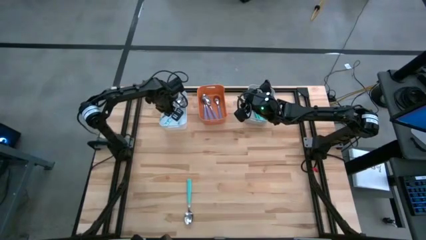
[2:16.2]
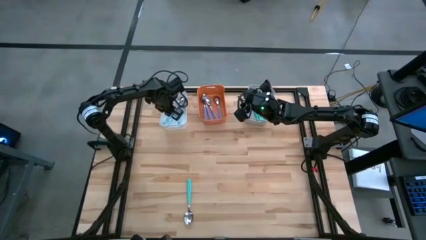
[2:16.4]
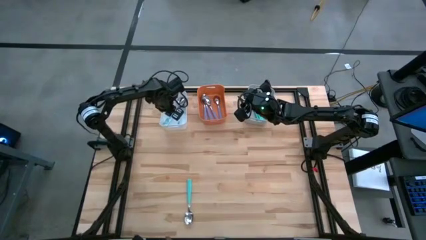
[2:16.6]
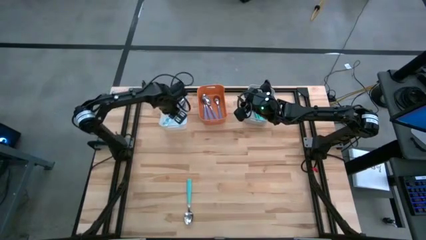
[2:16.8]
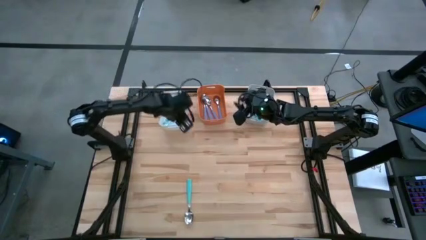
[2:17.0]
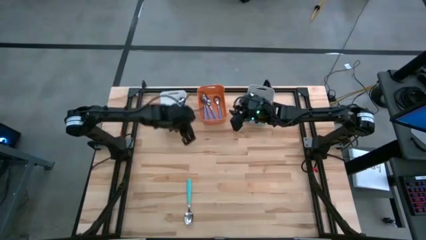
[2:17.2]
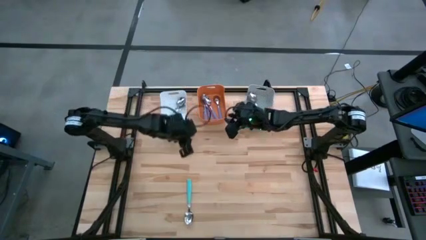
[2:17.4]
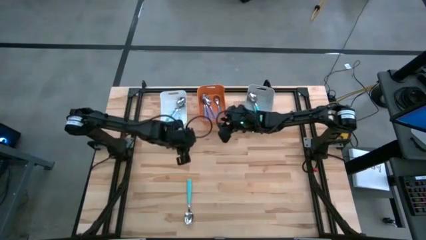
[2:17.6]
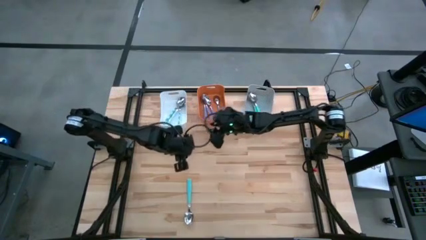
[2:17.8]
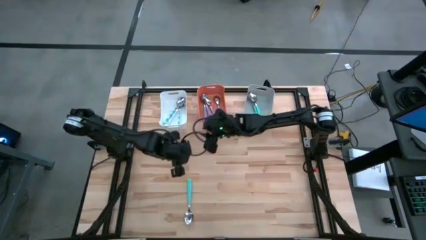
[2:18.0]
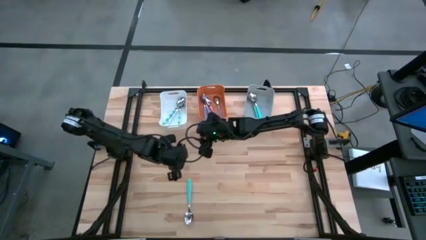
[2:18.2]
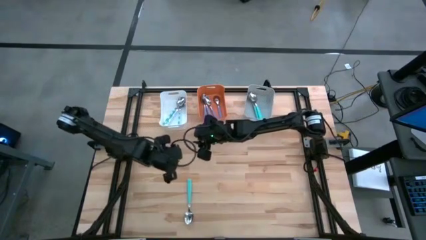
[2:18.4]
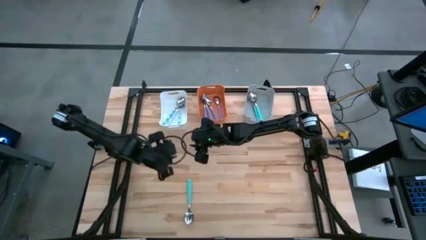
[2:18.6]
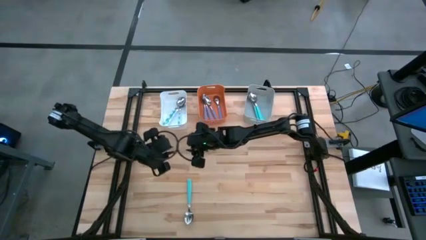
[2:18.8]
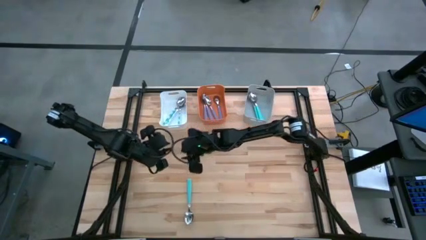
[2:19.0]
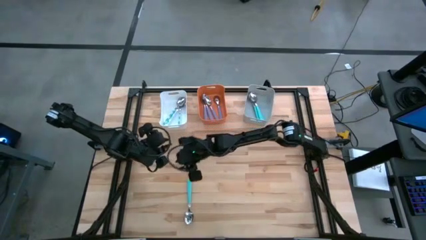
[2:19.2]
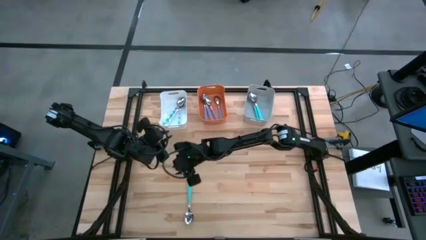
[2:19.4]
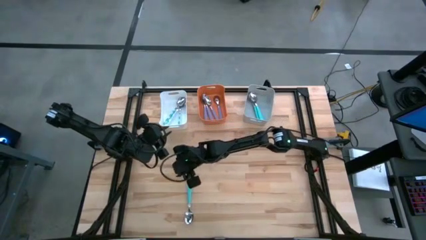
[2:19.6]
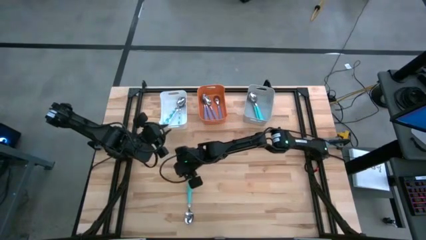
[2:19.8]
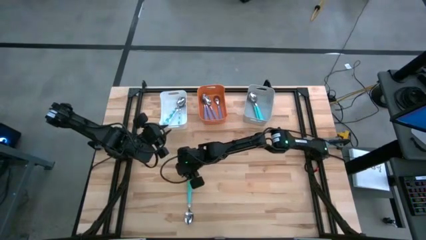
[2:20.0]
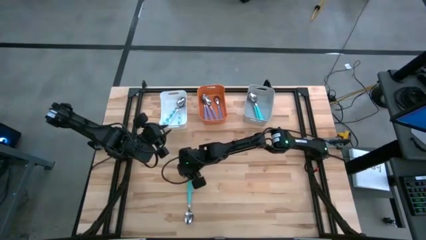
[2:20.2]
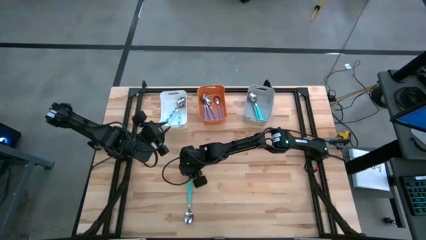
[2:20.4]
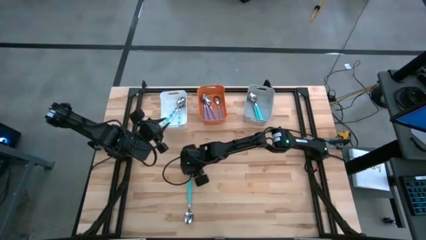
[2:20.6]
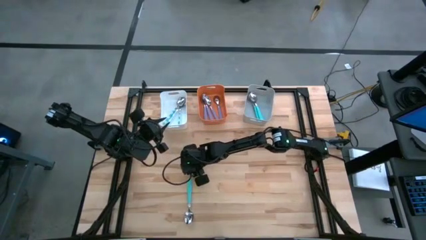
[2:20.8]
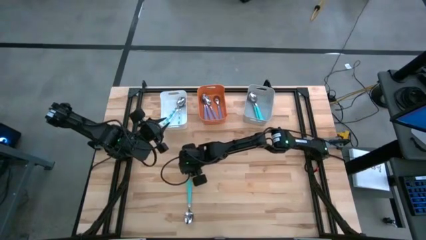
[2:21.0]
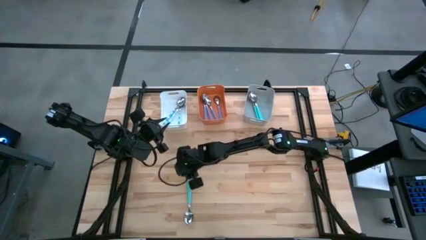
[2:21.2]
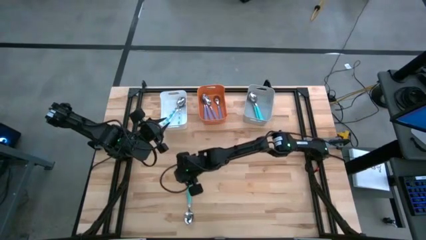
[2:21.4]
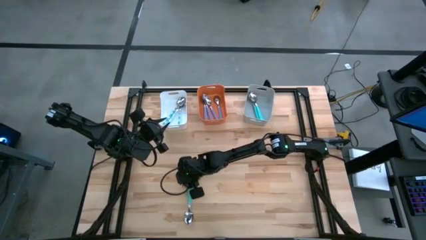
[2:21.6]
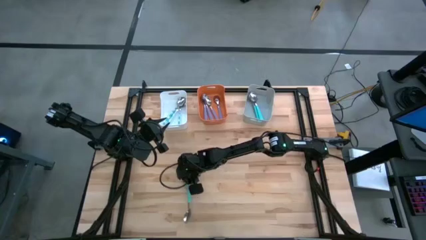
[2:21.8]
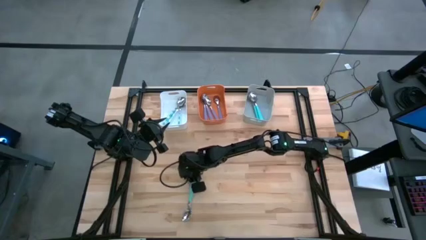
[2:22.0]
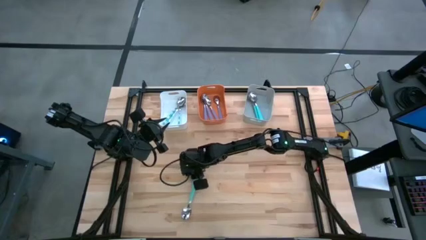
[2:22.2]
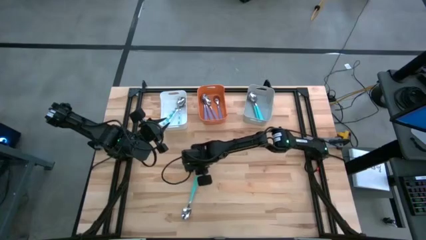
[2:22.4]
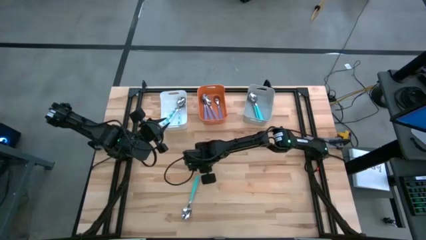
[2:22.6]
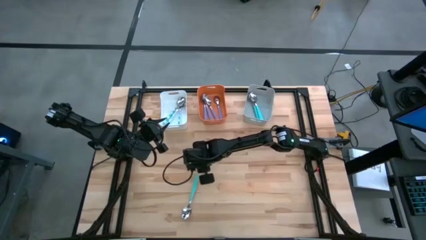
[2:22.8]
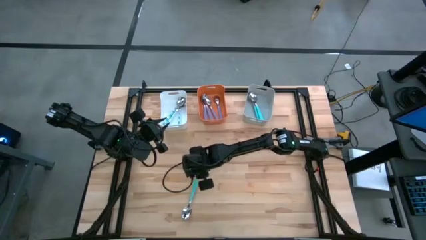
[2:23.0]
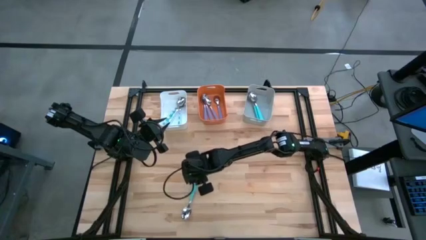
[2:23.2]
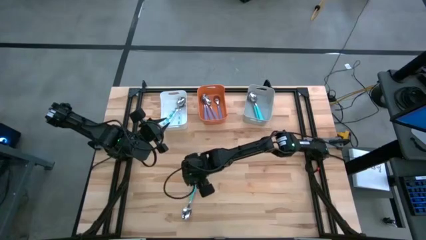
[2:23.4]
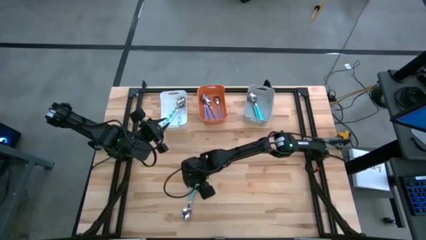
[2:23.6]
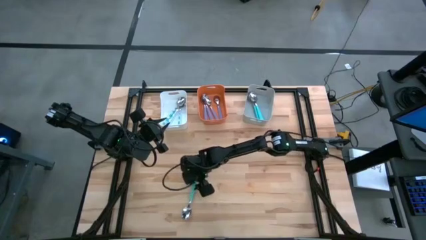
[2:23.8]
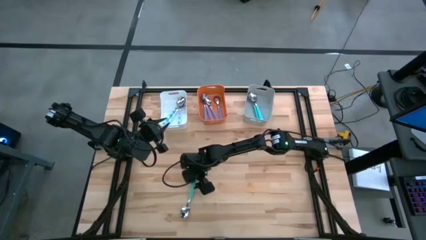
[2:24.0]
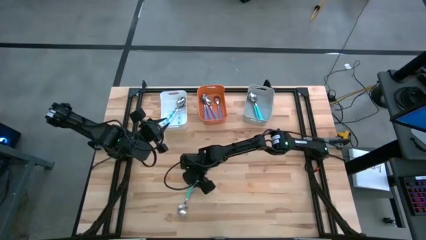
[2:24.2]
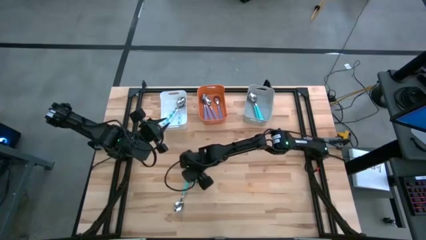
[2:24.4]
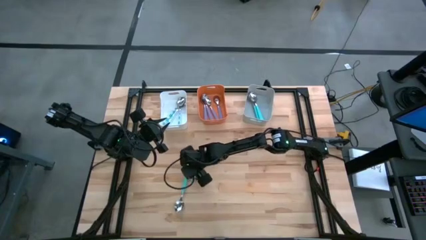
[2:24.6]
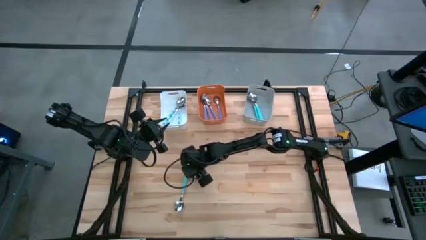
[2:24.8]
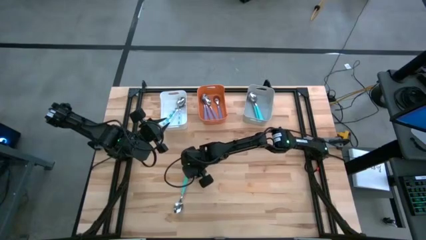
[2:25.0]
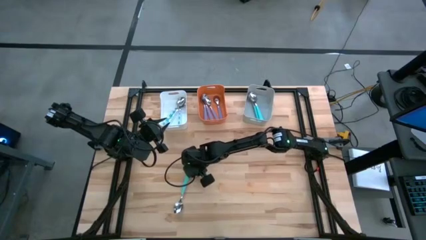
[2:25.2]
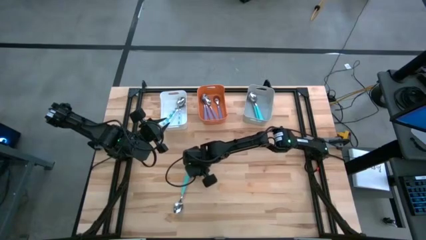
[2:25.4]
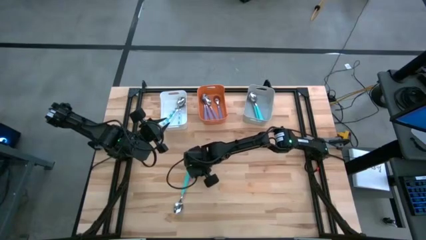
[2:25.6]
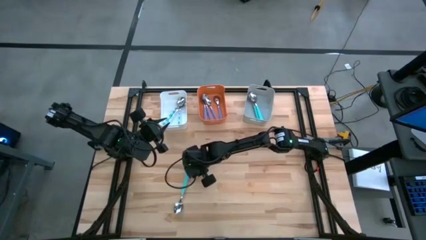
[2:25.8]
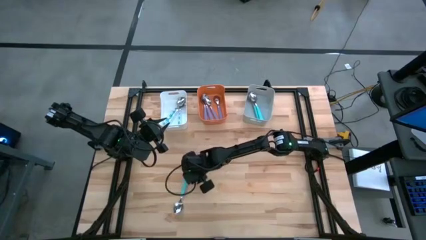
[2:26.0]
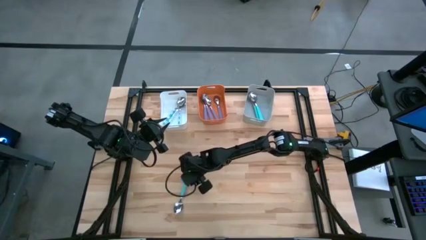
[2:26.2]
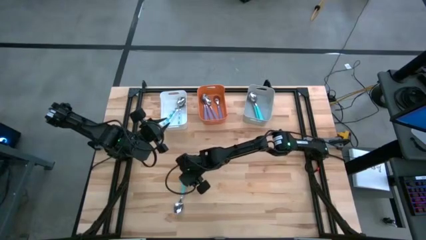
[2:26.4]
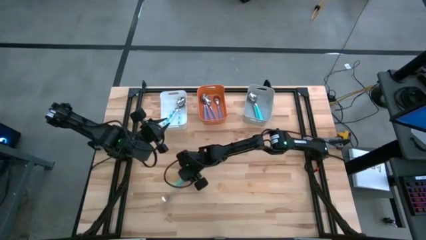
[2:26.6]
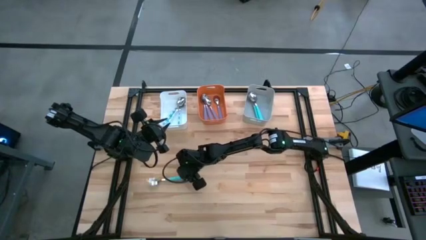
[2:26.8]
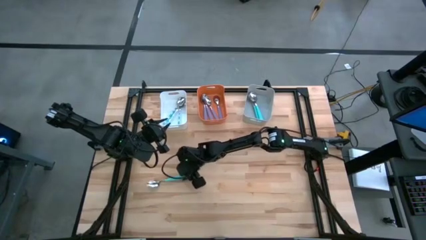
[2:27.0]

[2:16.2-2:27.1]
Task: Sort silverware by color (type)
Put the green spoon into the gray bin

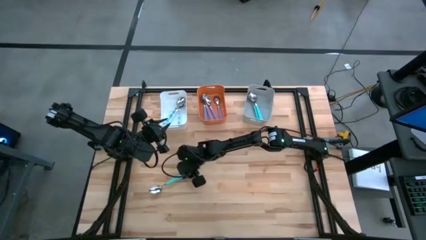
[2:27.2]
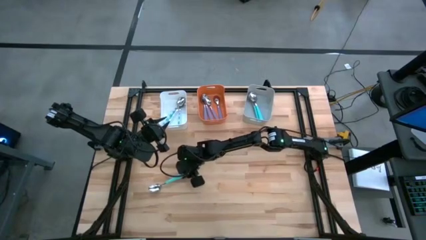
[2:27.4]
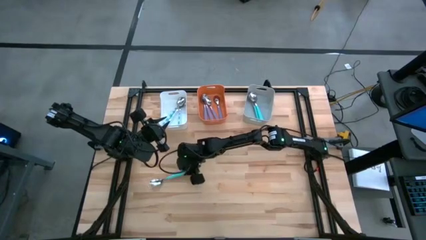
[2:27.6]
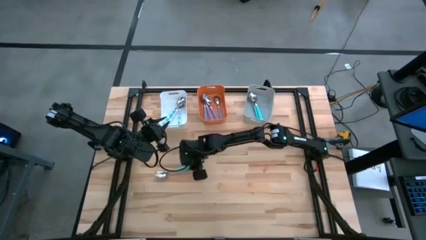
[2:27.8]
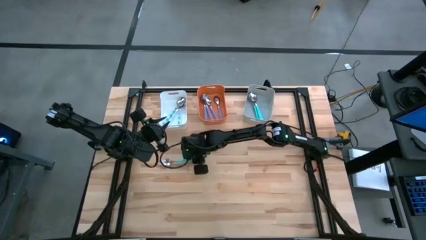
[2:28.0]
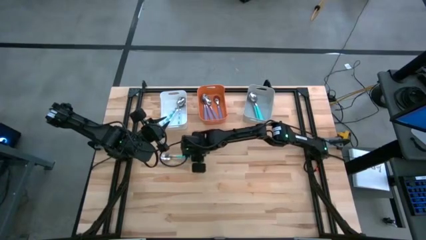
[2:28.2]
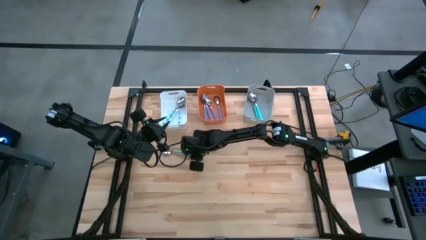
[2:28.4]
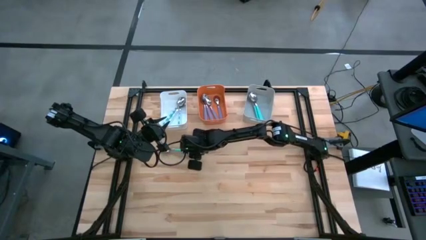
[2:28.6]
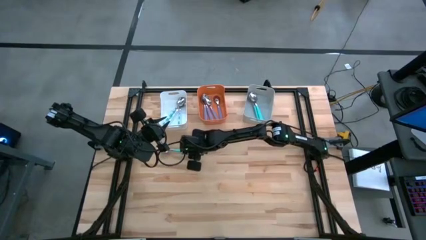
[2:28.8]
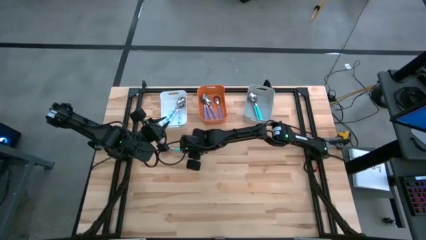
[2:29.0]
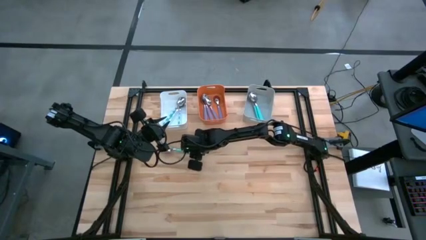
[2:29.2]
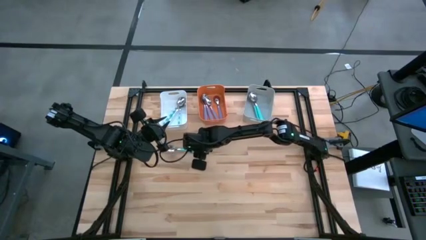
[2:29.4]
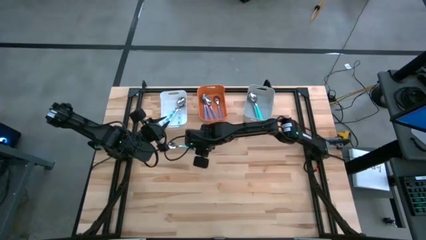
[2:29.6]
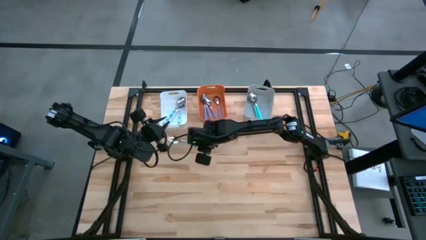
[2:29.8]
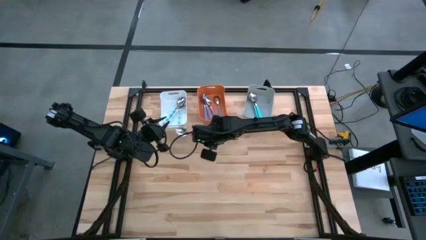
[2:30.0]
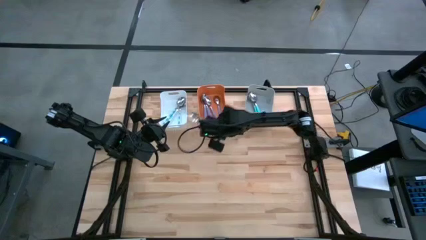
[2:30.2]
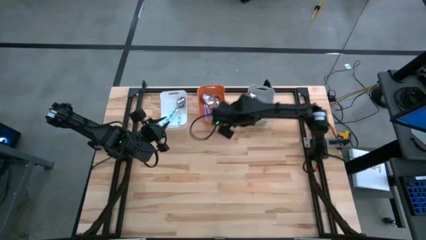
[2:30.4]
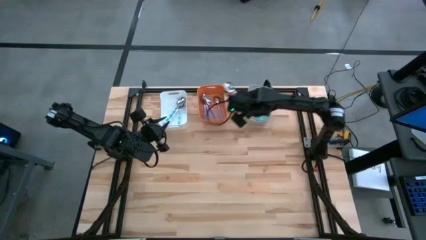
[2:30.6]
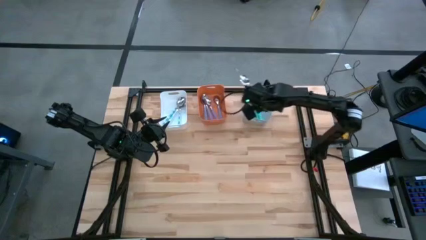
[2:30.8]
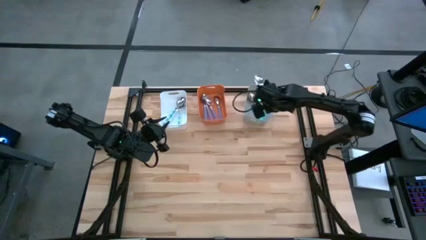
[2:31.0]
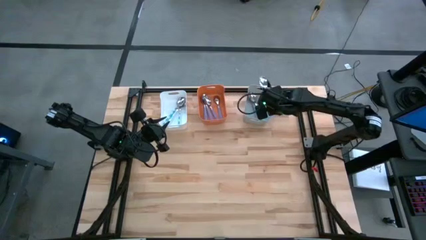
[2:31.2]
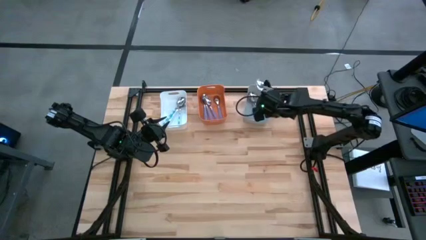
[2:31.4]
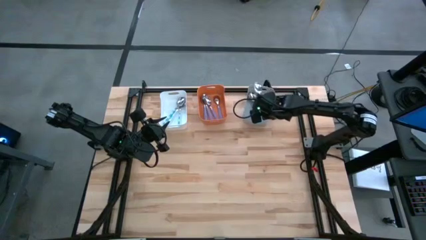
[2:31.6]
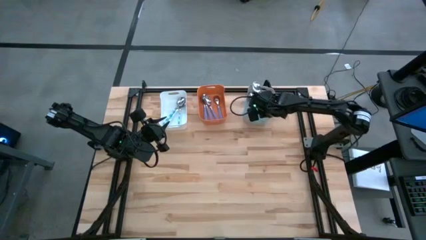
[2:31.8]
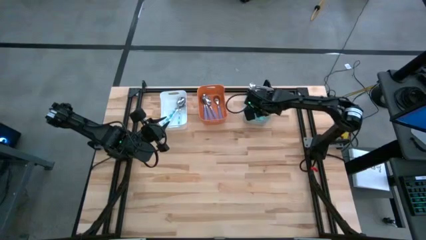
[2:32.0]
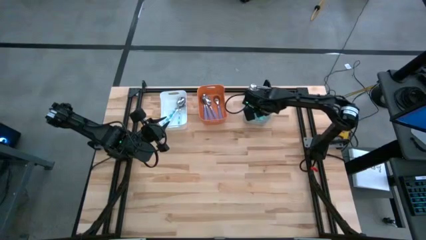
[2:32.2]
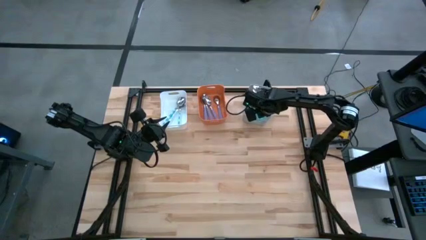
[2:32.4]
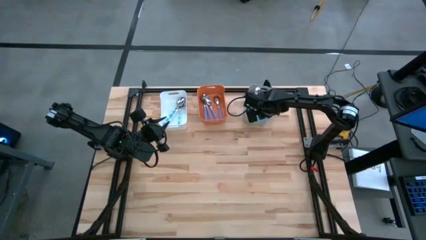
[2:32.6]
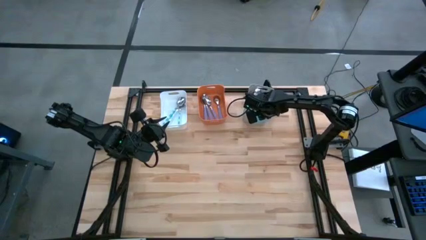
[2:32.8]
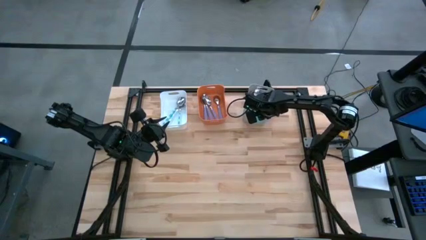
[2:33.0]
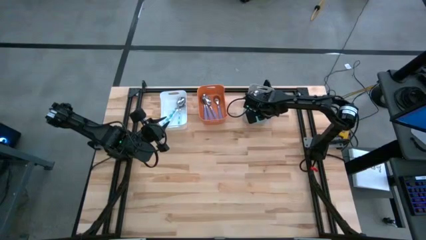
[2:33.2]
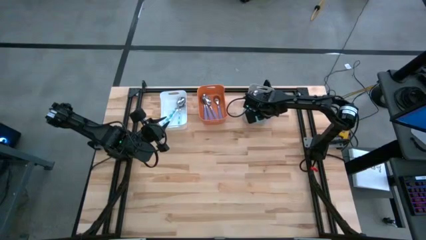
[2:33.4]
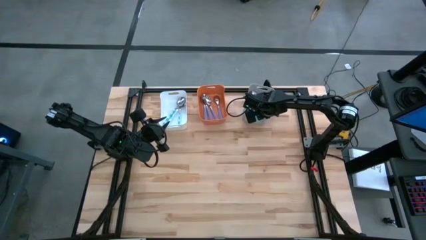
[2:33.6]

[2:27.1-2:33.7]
Put the green spoon into the gray bin
